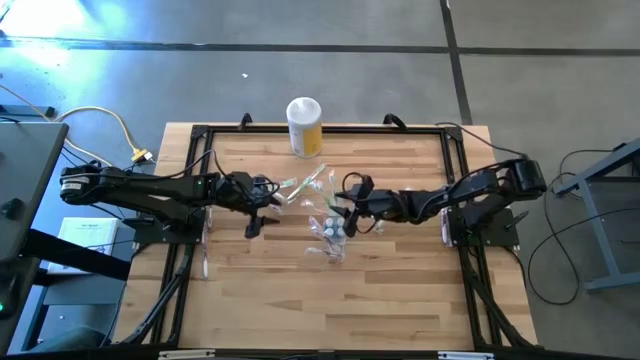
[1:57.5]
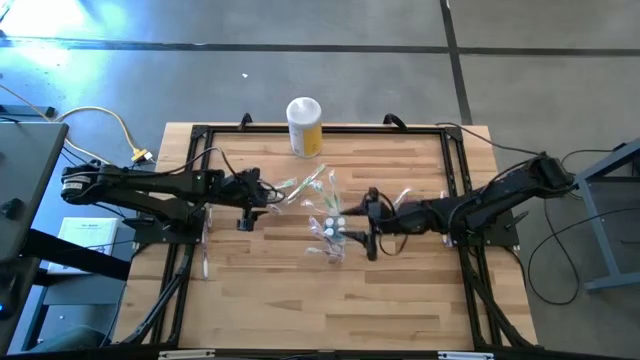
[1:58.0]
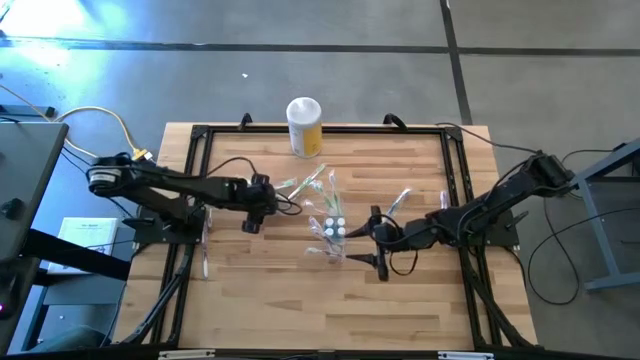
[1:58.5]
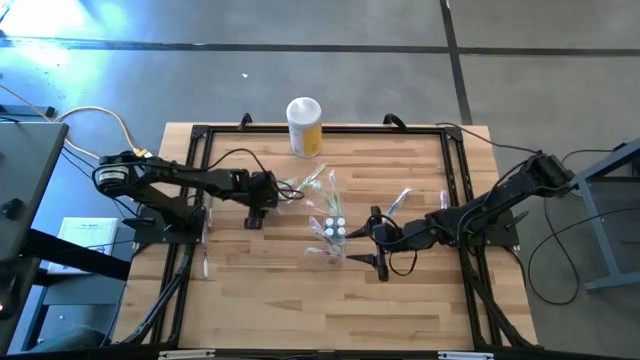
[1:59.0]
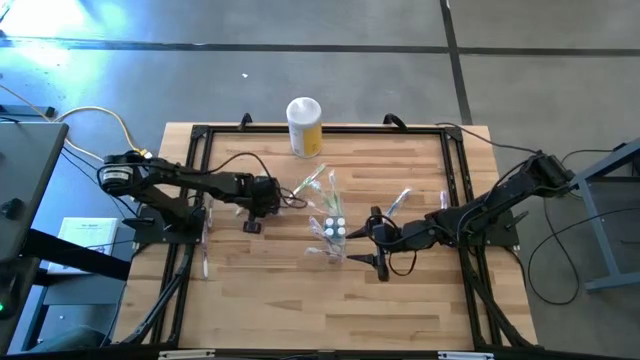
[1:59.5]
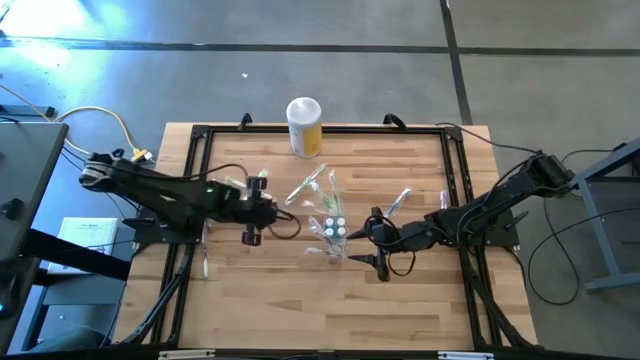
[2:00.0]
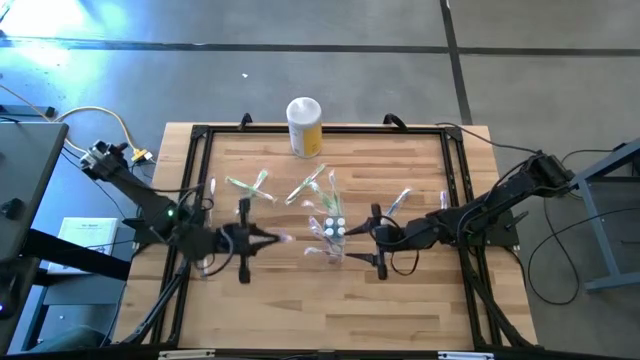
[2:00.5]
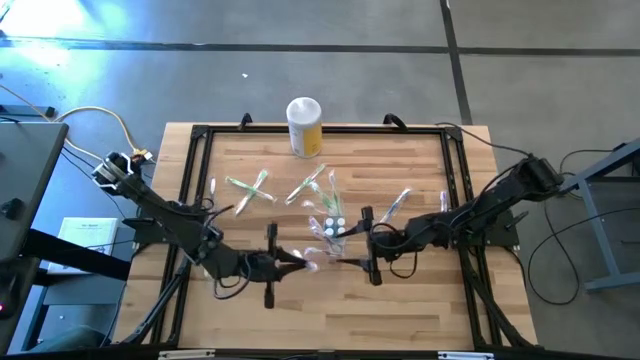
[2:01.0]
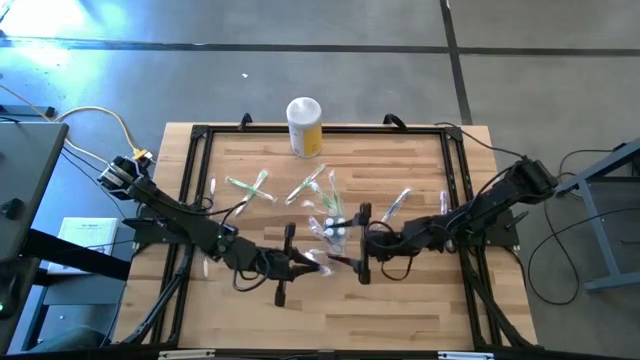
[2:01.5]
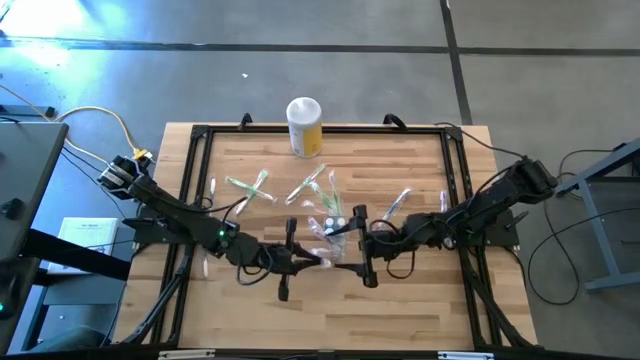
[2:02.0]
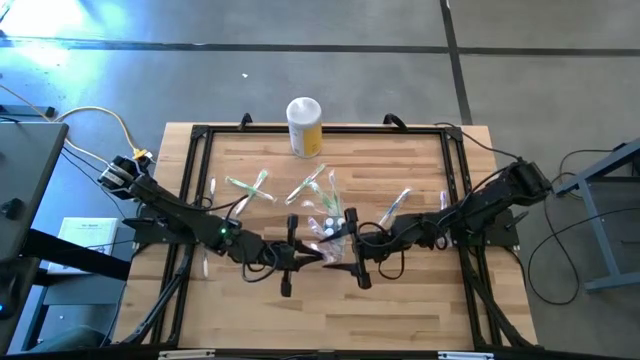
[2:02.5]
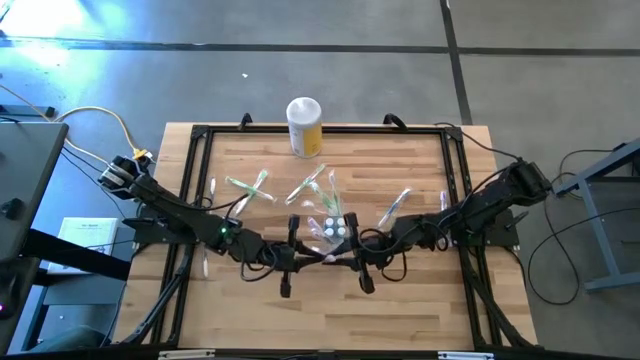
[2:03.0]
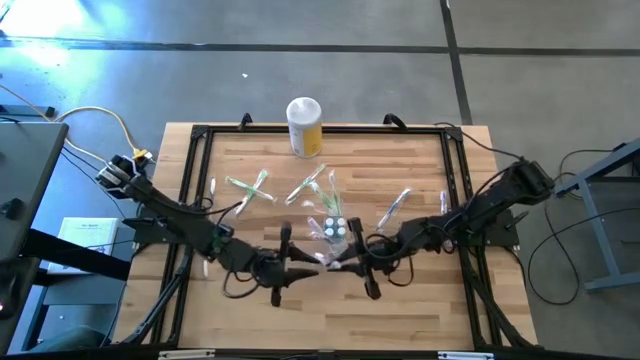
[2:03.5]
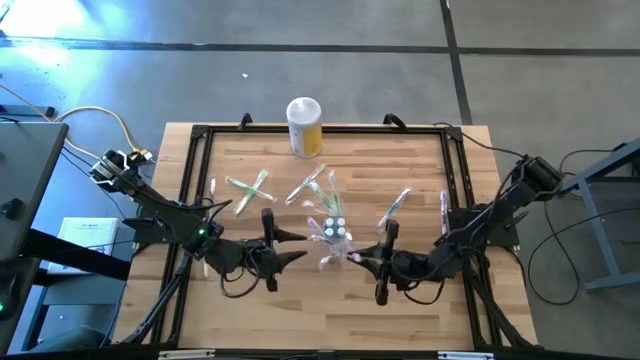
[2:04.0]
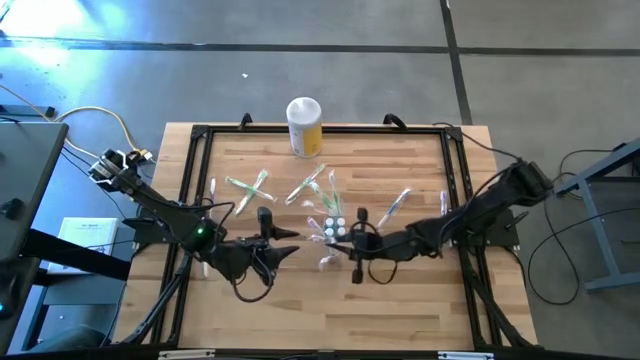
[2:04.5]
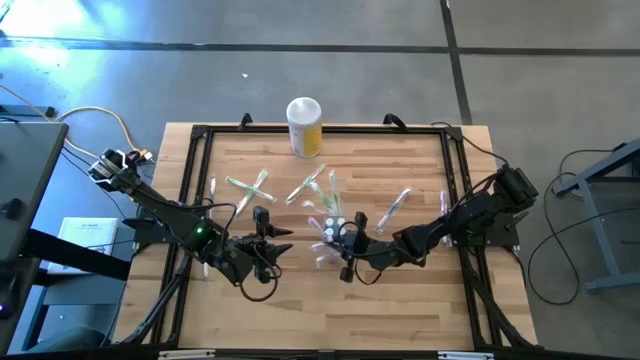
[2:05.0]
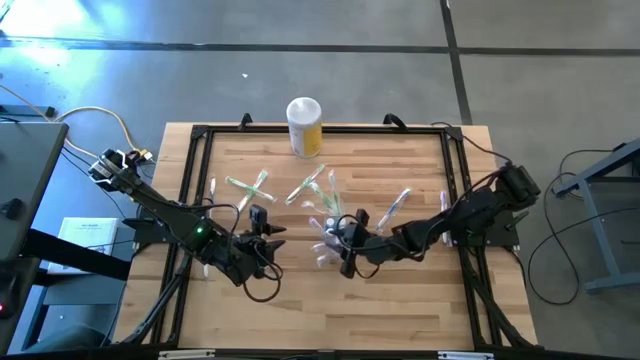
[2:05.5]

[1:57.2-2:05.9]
Task: Pick & Place toothbrushing station
Put the purple toothbrush into the transparent organizer

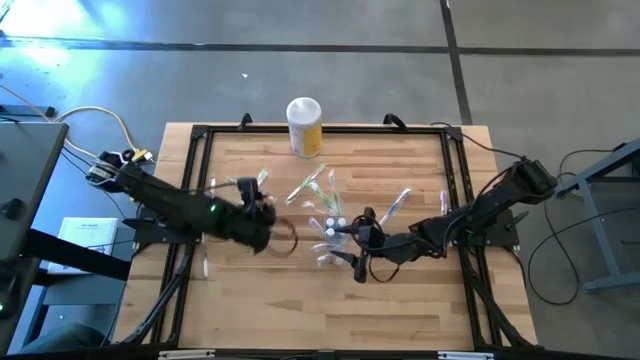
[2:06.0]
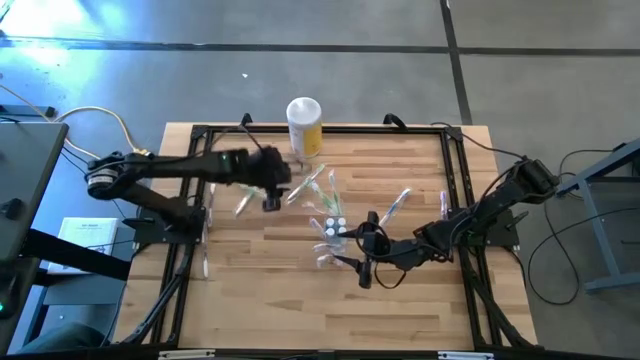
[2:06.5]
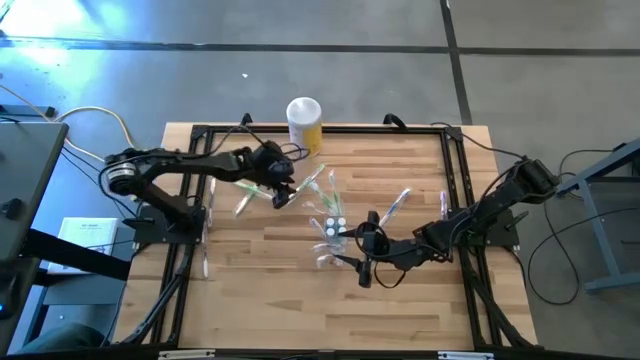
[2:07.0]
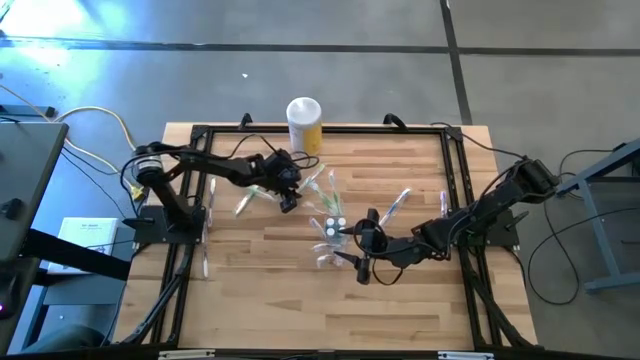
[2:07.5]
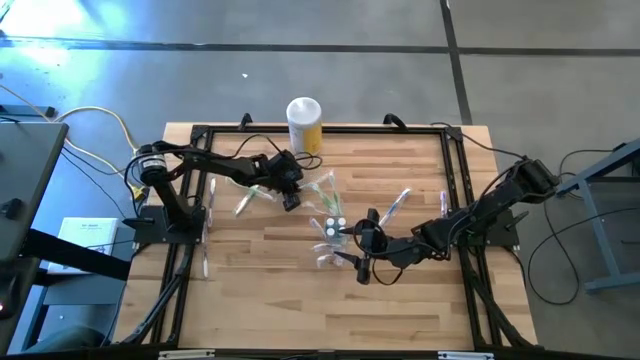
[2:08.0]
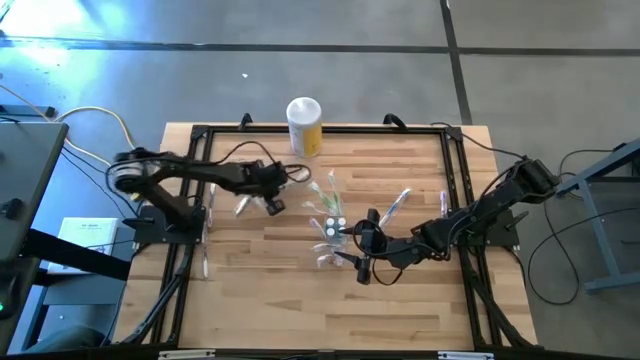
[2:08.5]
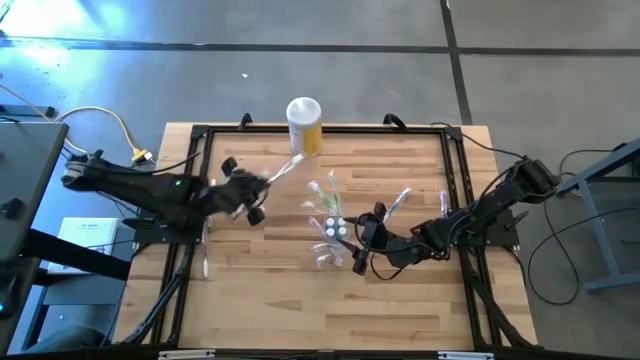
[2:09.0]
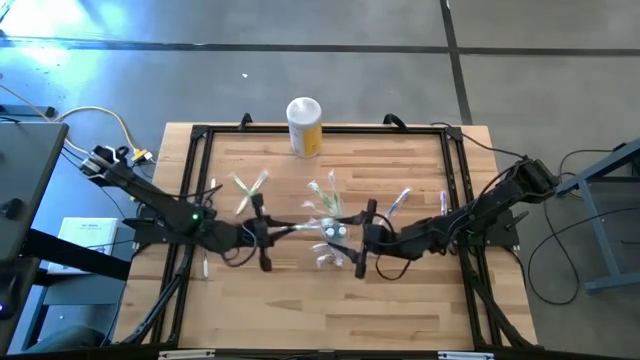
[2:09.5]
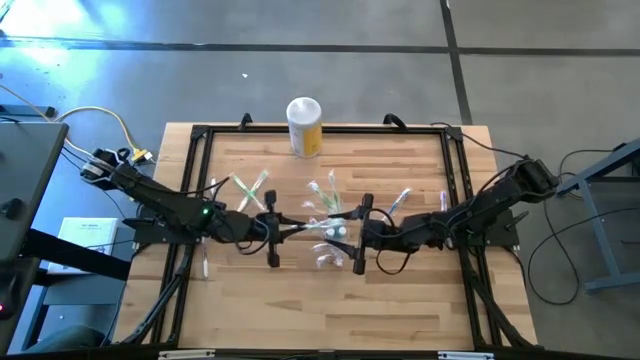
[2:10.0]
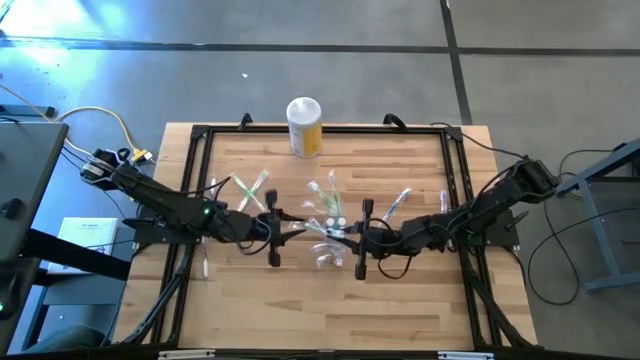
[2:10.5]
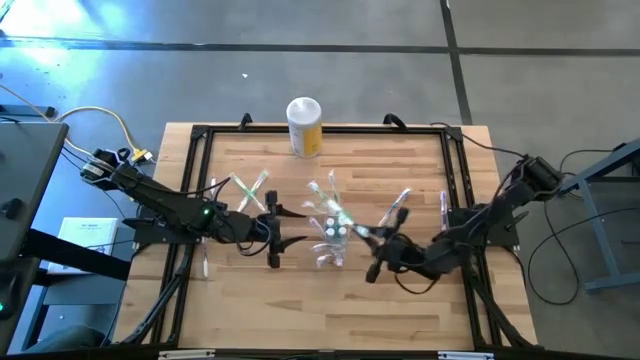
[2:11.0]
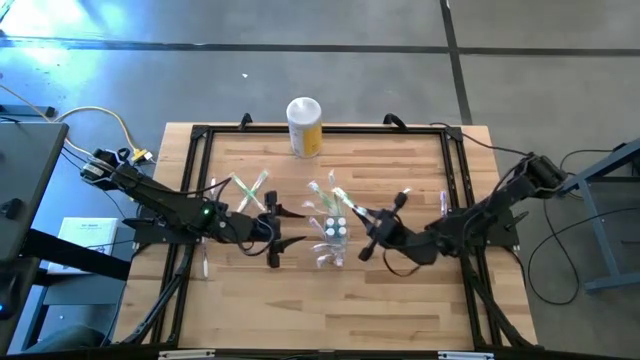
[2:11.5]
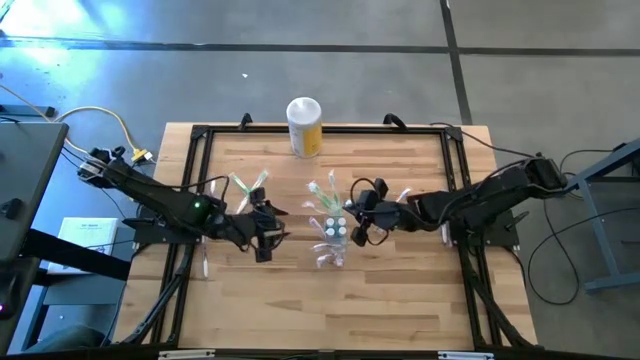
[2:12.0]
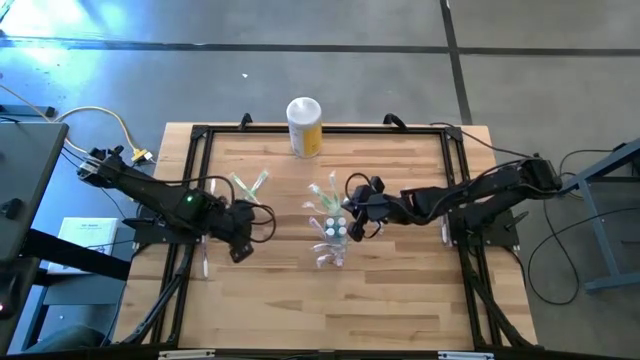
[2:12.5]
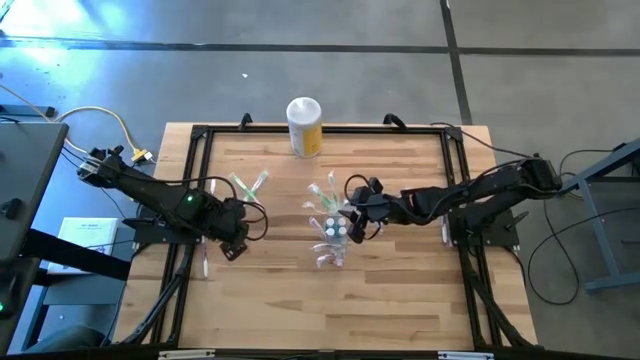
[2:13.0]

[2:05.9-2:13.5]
Put the green toothbrush into the transparent organizer

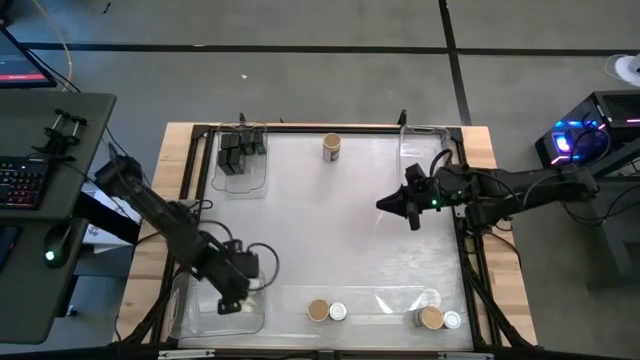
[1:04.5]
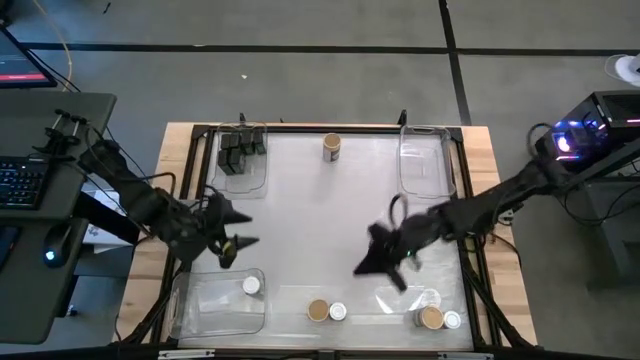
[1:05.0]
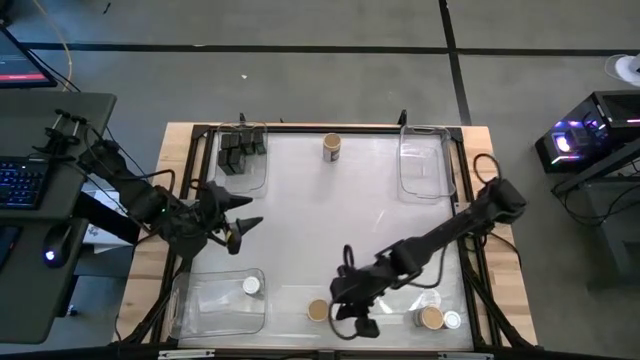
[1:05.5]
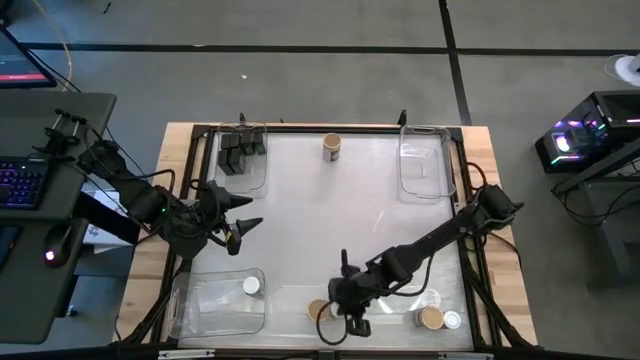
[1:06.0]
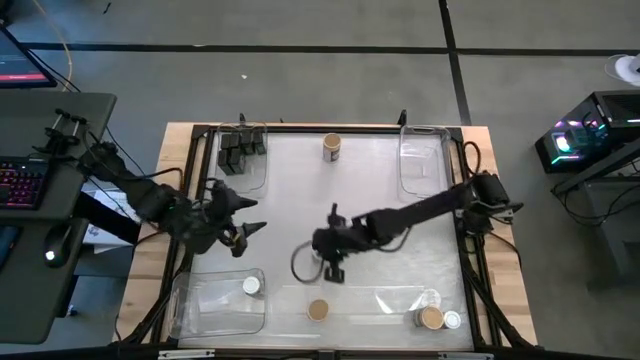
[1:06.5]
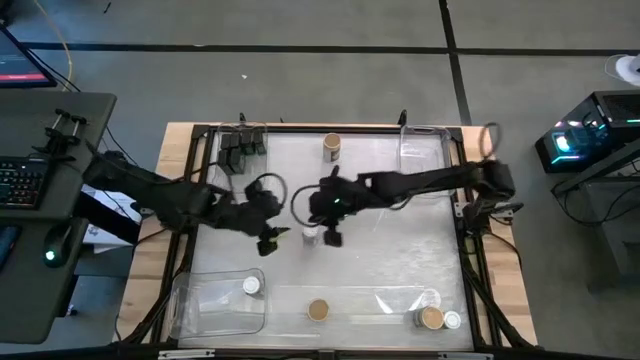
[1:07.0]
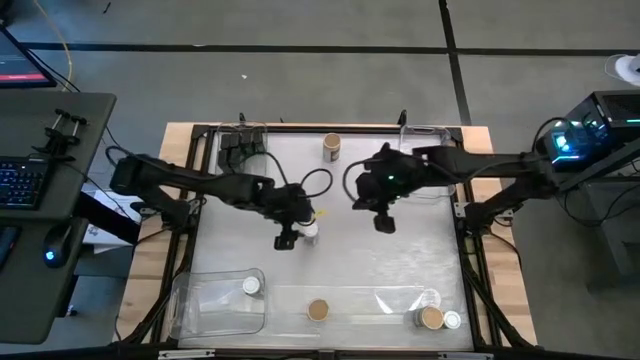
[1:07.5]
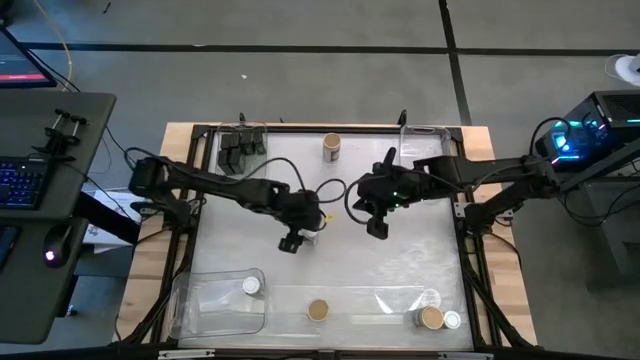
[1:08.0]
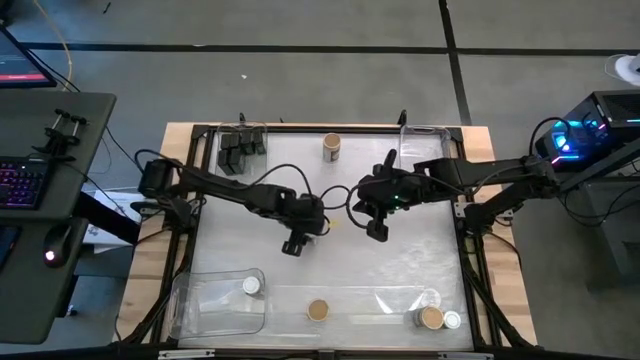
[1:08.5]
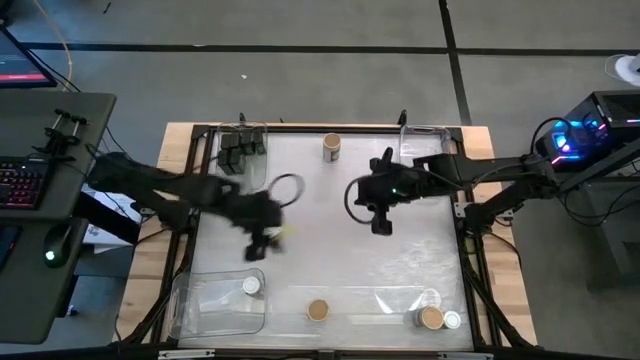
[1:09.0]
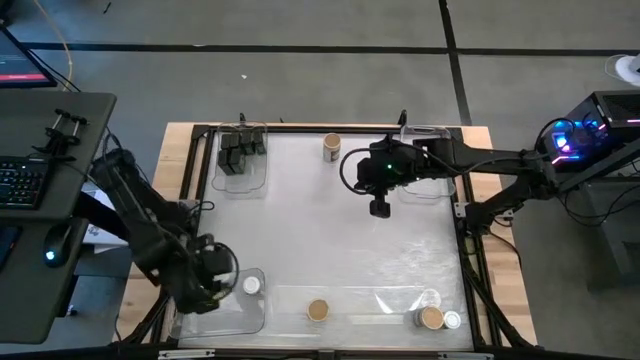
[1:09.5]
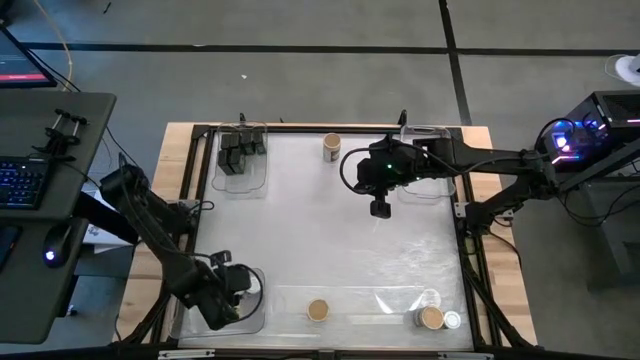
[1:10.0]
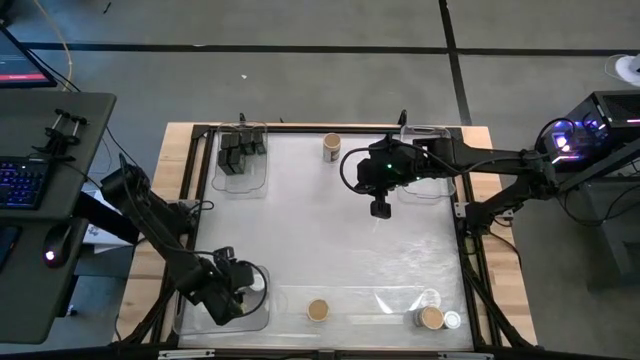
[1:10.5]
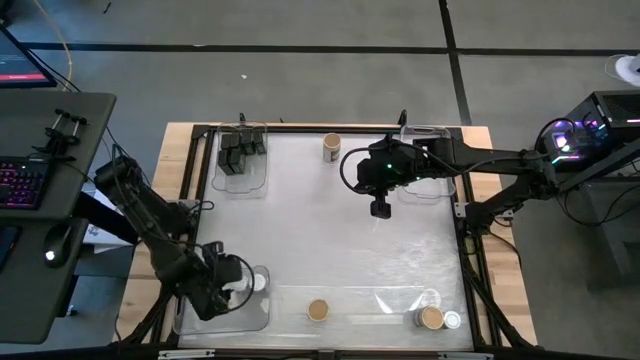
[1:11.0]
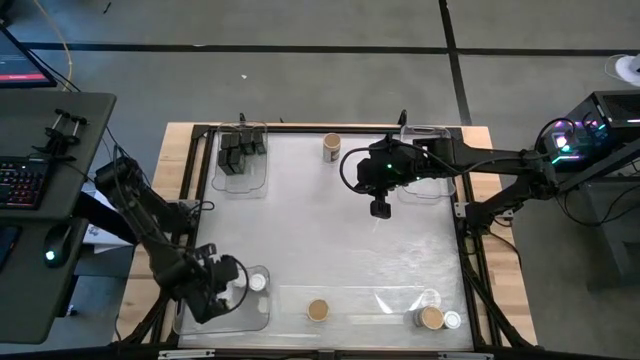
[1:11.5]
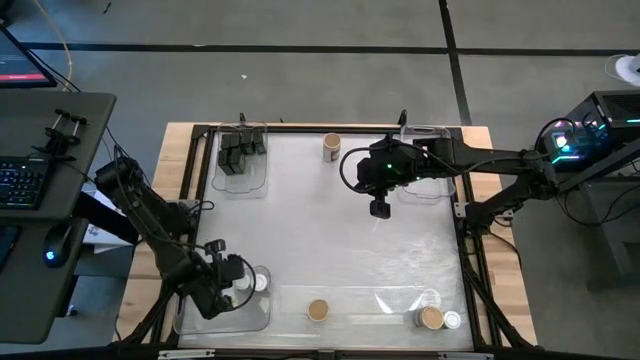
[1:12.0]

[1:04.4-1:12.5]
Task: Sort spices by type
Put the left white seasoning bottle into the bottom transparent bin
